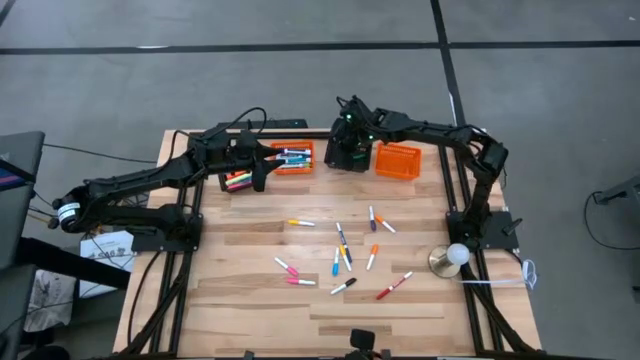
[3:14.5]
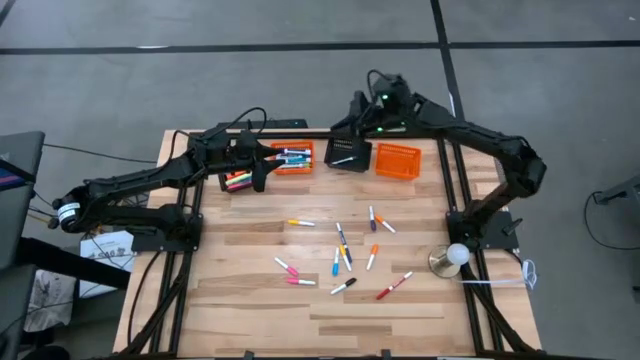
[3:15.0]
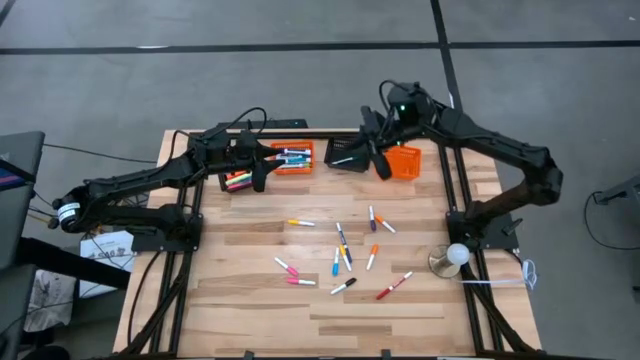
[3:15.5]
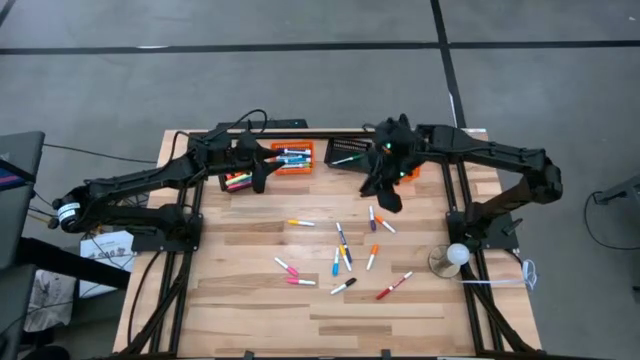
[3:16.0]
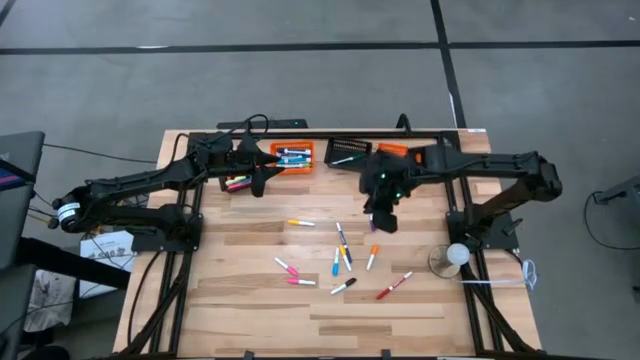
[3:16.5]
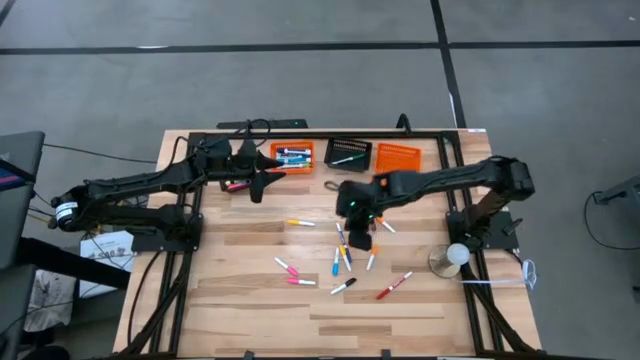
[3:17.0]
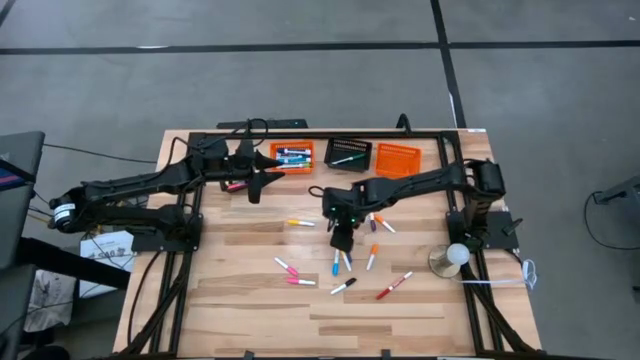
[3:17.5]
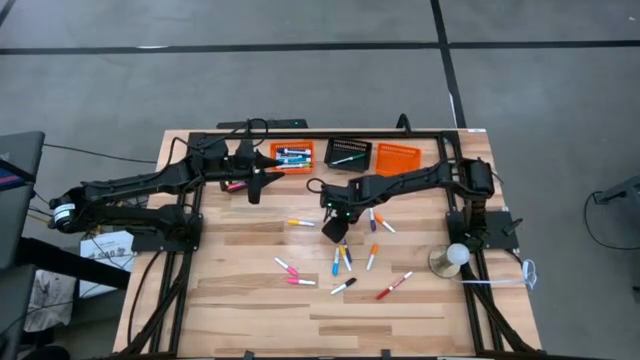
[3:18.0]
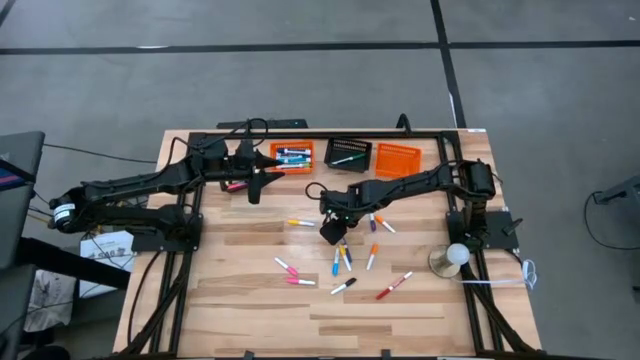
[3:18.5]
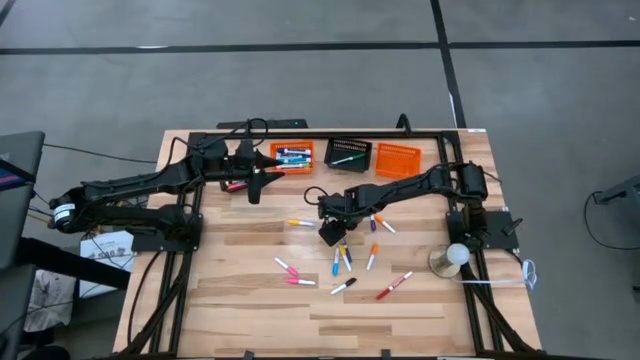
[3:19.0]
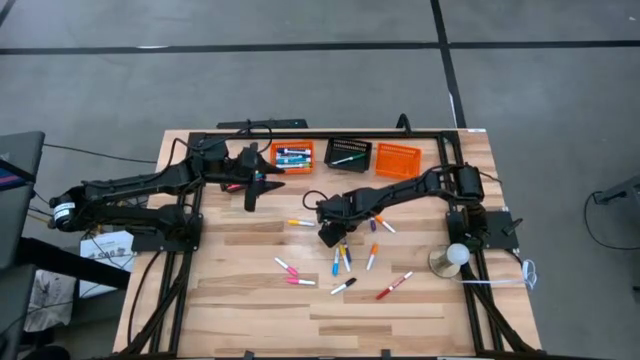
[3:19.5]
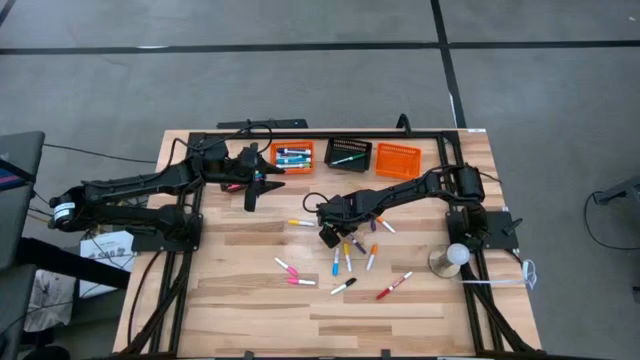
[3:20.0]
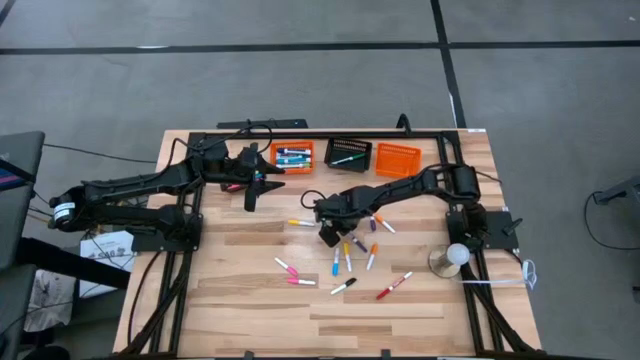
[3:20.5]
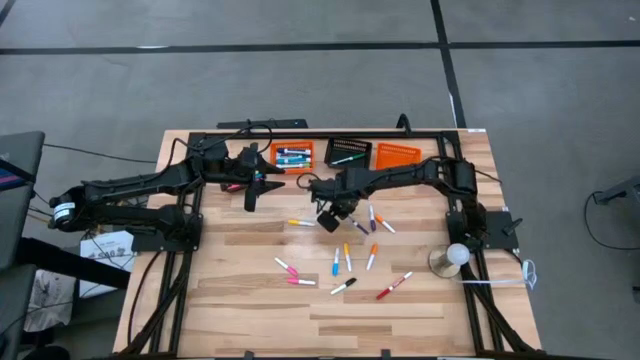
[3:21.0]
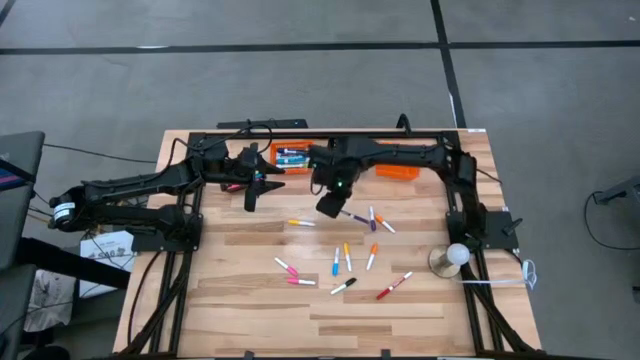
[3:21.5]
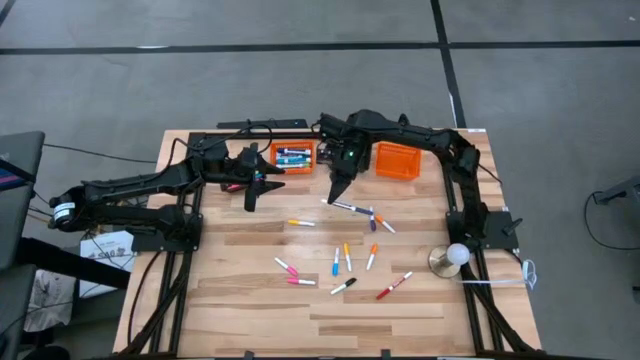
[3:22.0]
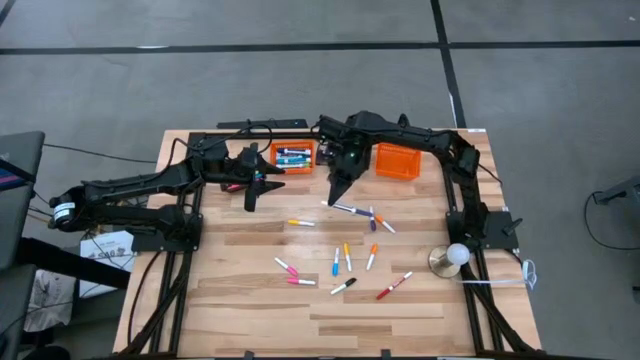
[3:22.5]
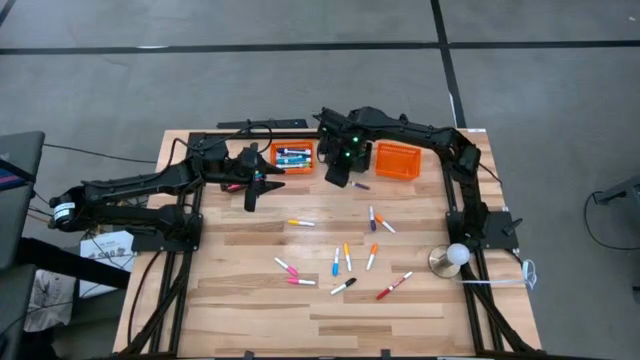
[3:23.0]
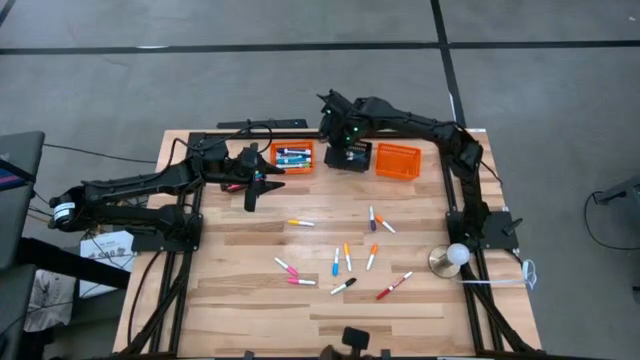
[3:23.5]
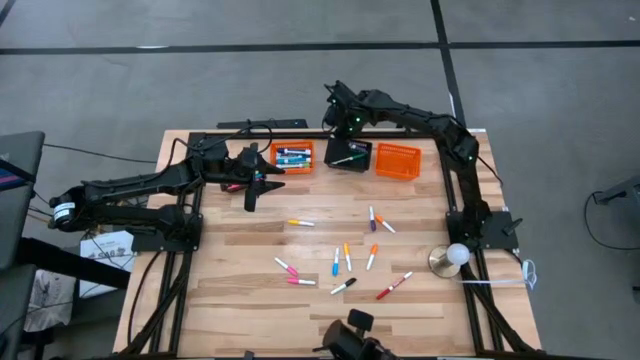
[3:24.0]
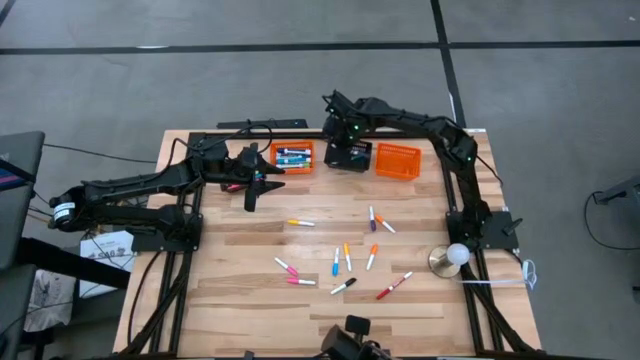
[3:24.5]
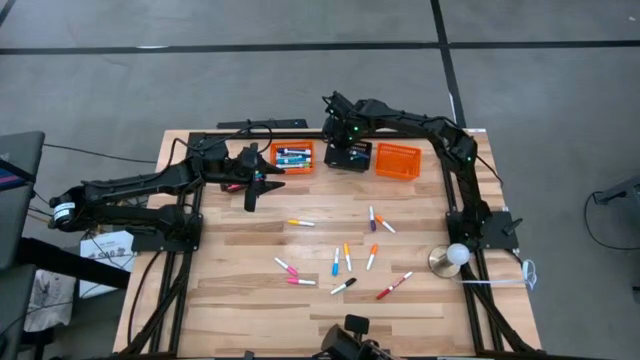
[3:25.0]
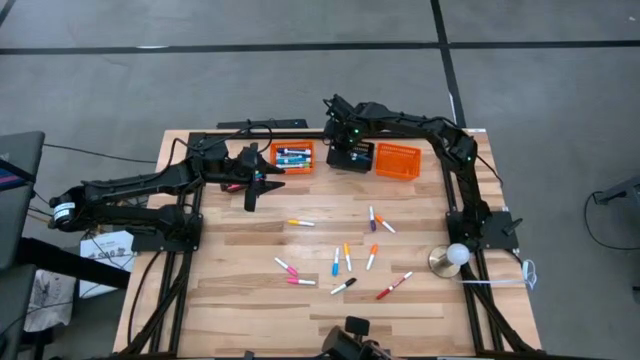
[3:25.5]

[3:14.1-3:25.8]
Task: Pick & Place Markers
Put the small blue marker pen into the right black bin

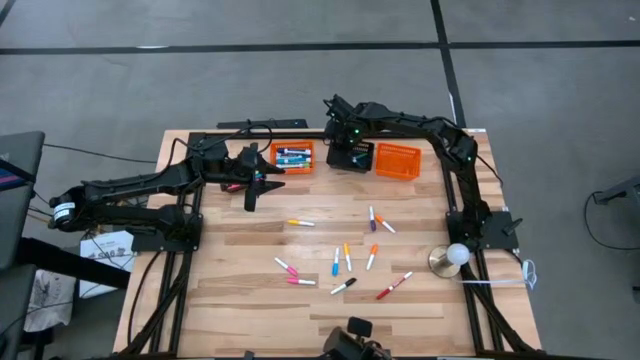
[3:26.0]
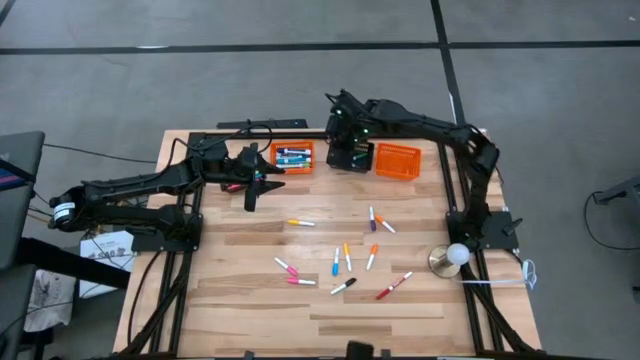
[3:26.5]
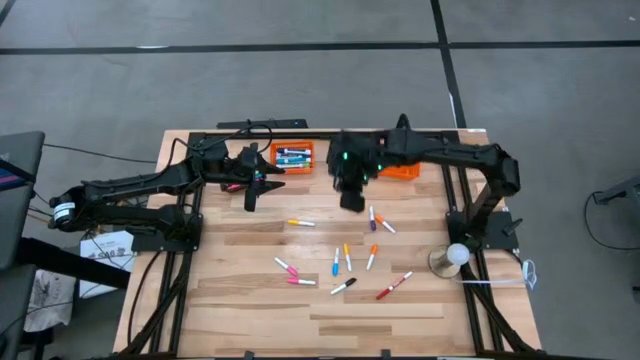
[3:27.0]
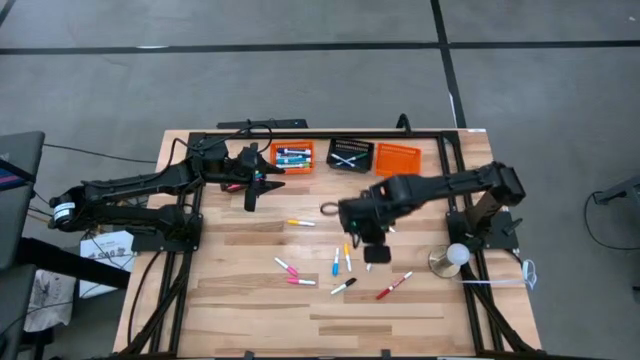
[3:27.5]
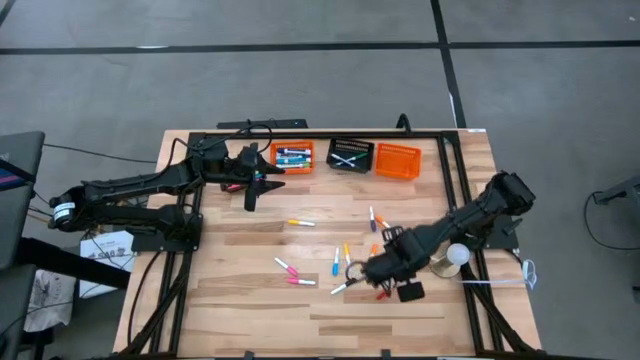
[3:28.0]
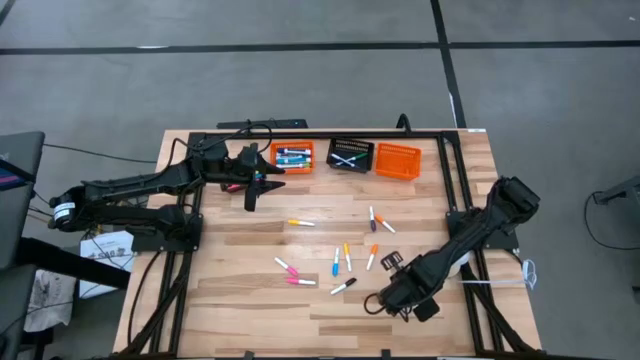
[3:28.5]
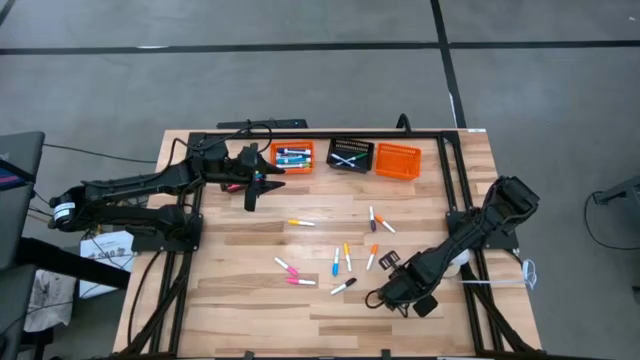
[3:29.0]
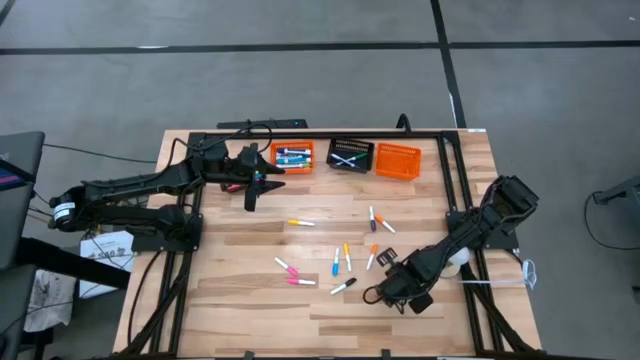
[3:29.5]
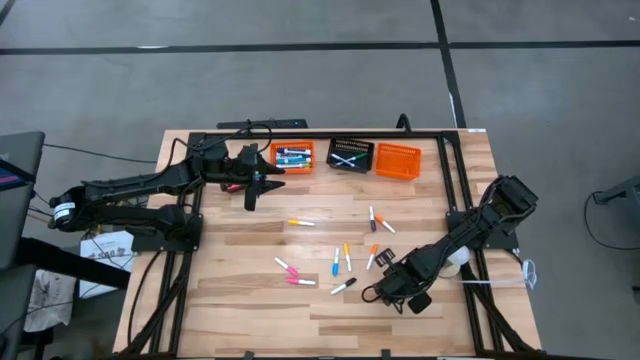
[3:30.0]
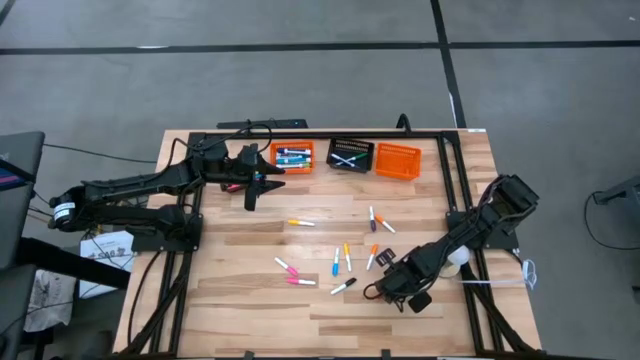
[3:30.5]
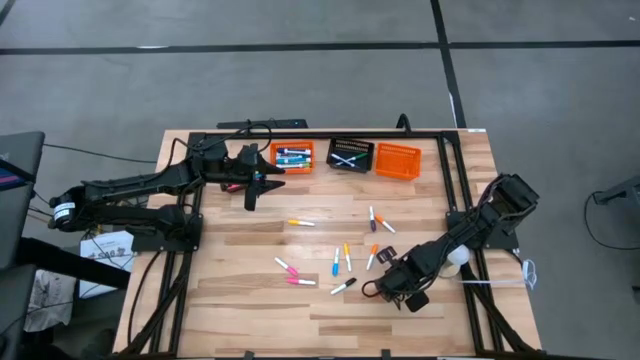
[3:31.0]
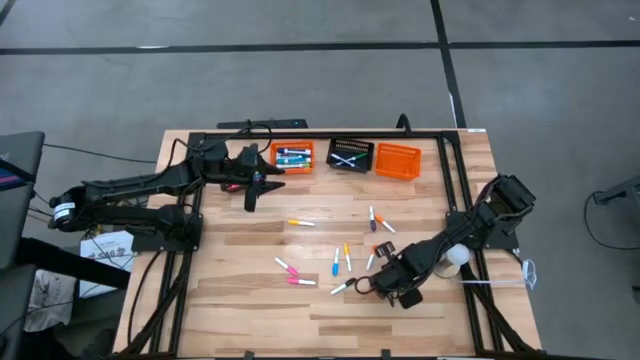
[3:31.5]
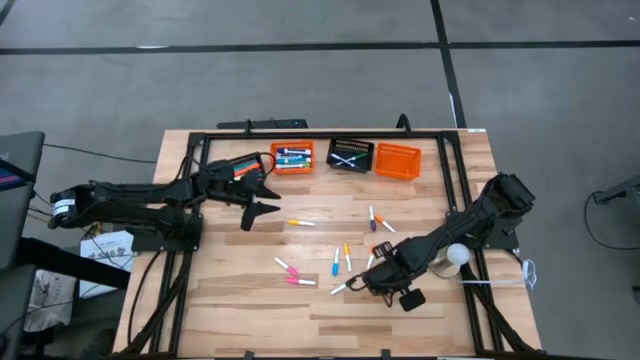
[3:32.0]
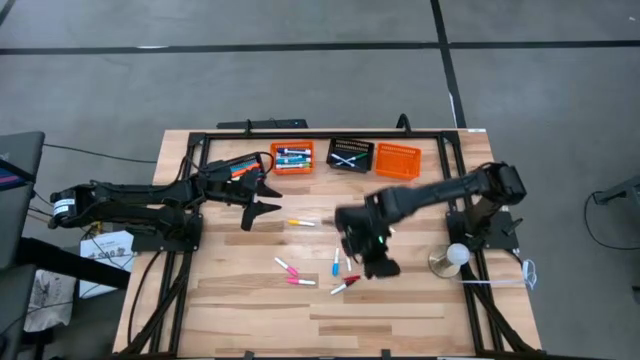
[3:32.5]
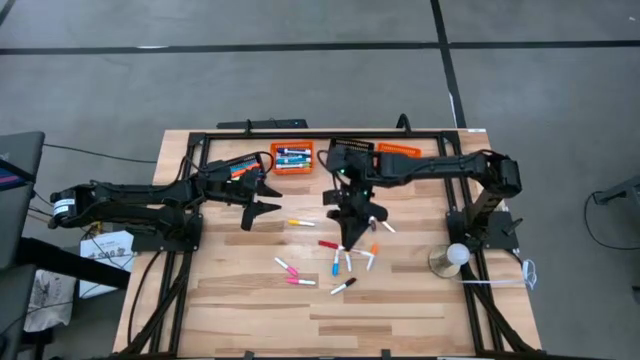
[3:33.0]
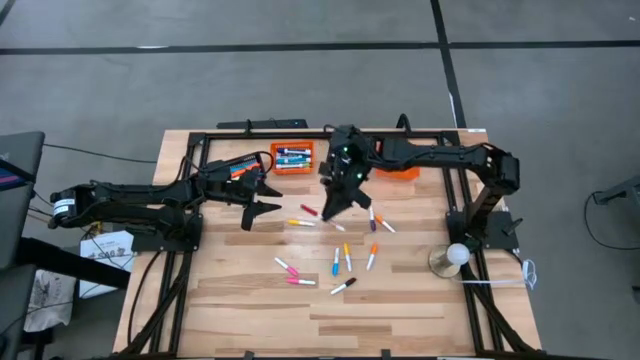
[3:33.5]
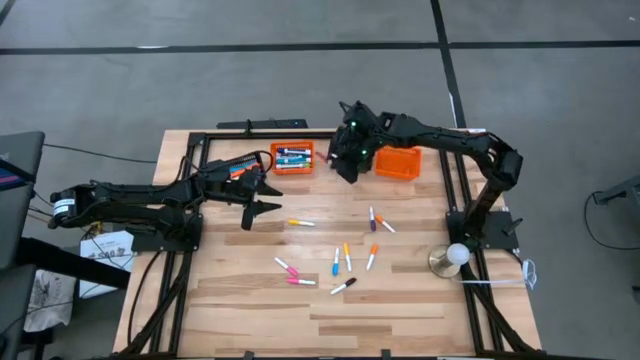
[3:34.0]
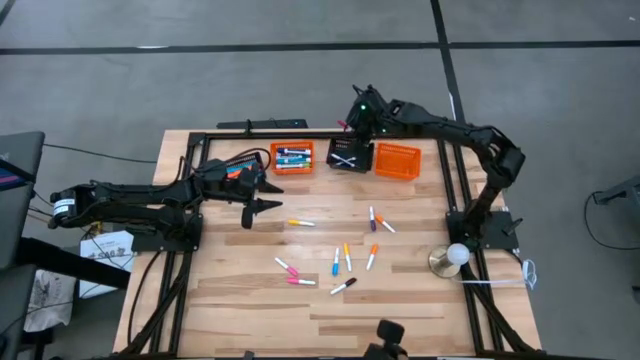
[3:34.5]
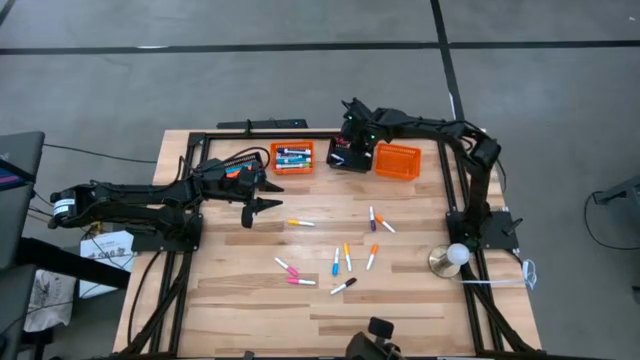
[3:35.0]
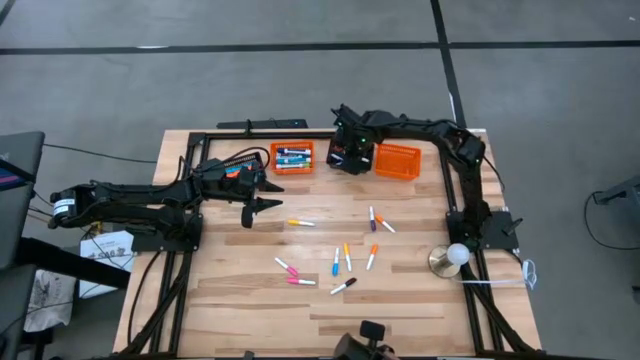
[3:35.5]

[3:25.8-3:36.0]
Put the small red marker pen into the right black bin

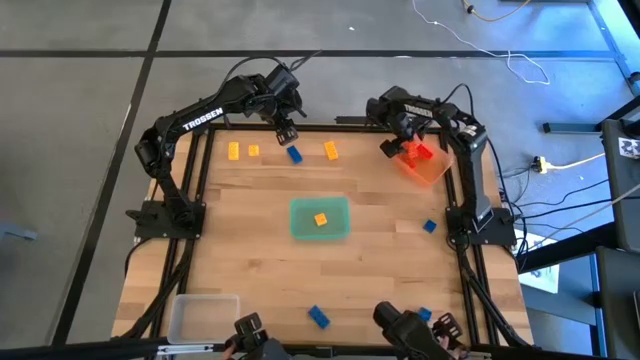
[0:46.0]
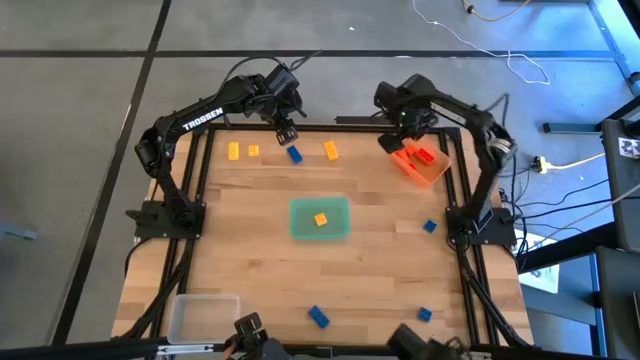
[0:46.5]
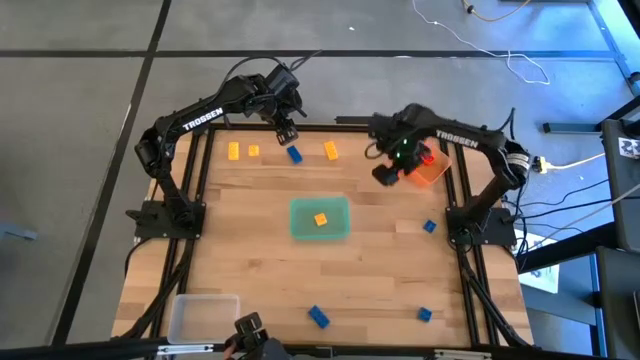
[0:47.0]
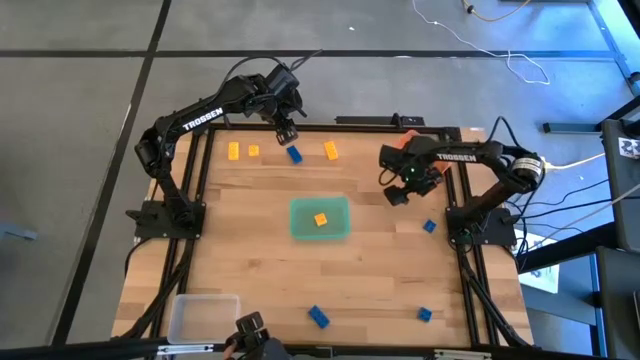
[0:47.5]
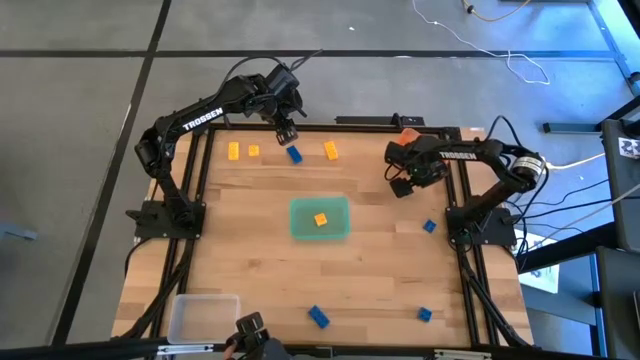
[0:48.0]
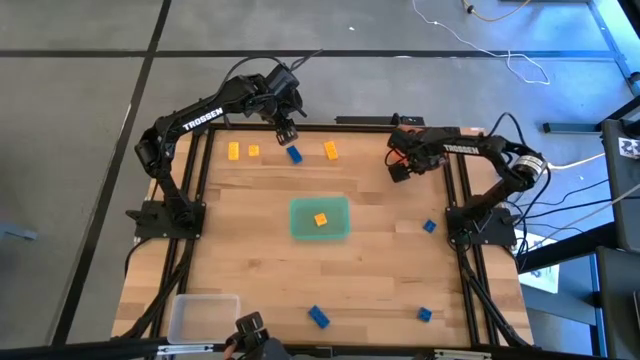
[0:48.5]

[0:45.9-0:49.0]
Task: Sort & place blocks by color
Adjust the orange bin
